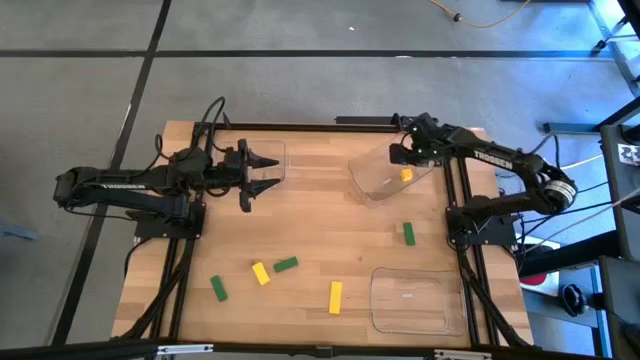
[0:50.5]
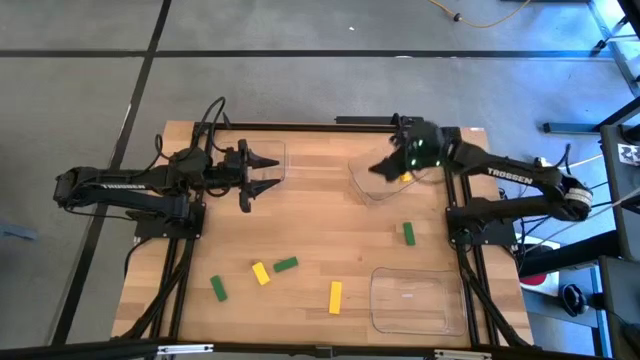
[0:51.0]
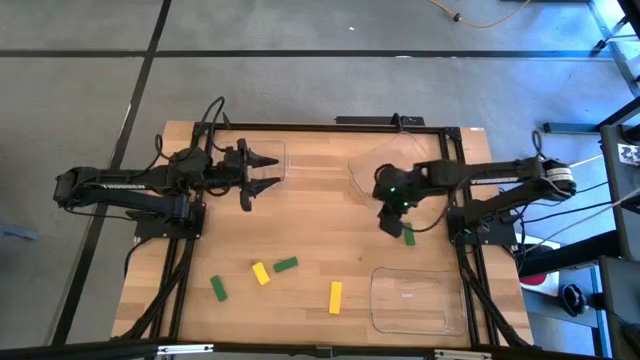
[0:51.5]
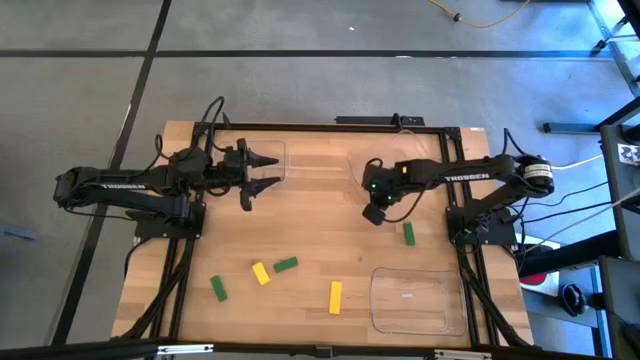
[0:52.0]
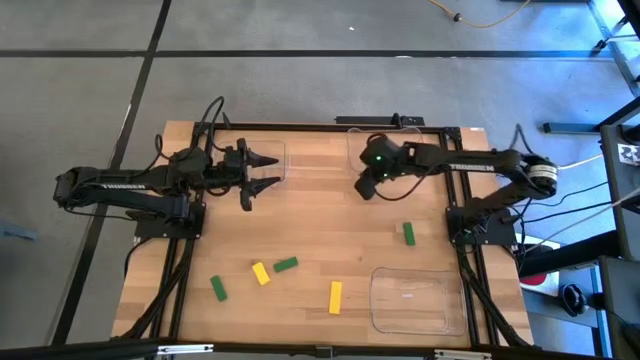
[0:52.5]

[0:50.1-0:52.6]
Task: Sort & place blocks by color
Adjust the top right transparent bin

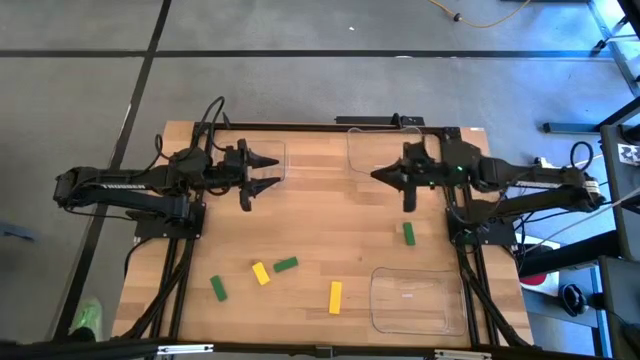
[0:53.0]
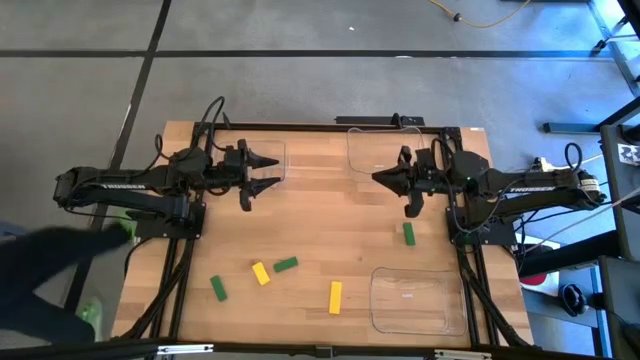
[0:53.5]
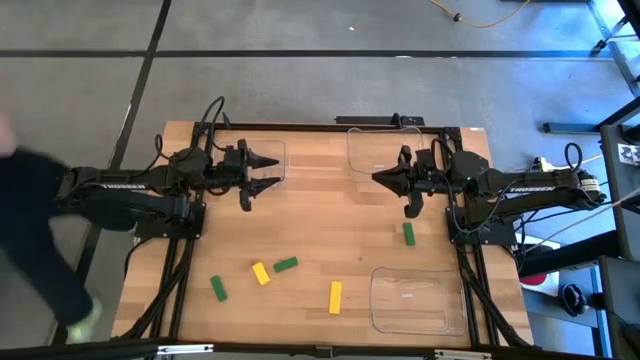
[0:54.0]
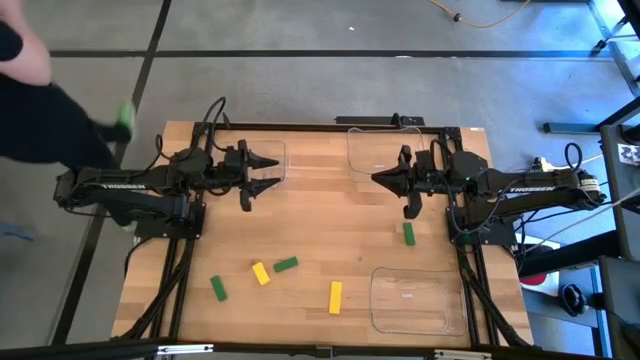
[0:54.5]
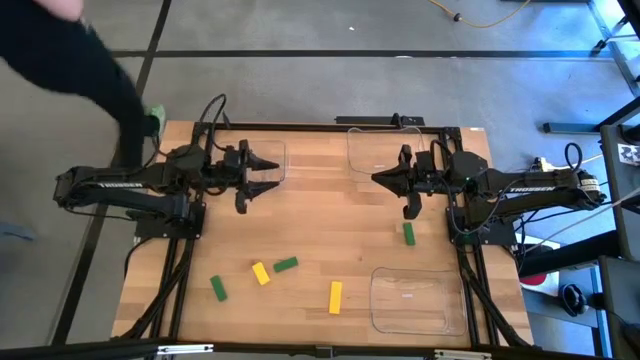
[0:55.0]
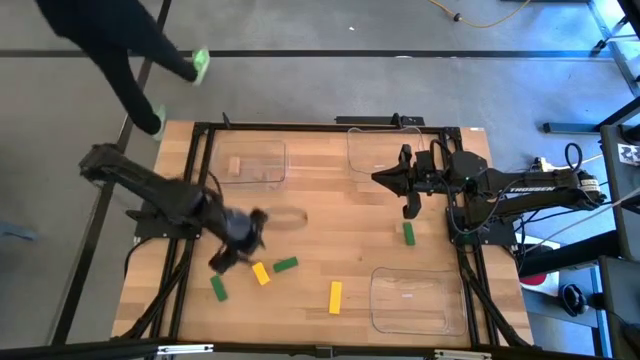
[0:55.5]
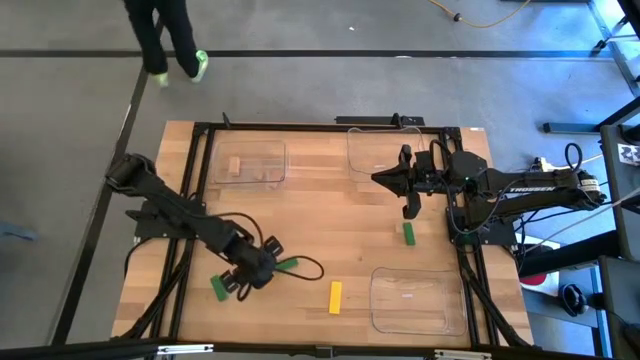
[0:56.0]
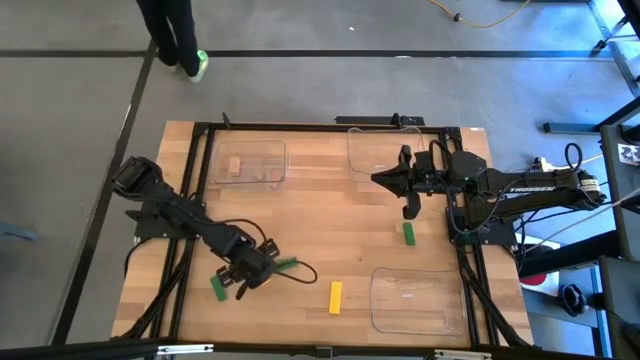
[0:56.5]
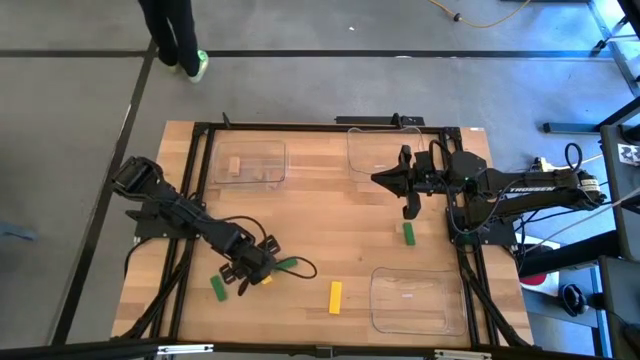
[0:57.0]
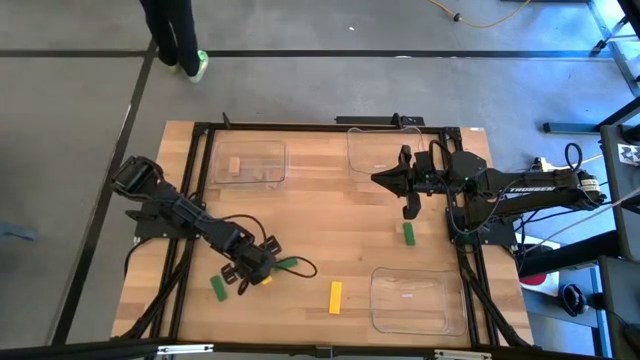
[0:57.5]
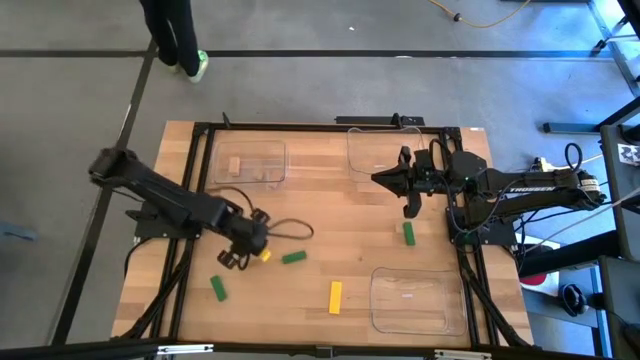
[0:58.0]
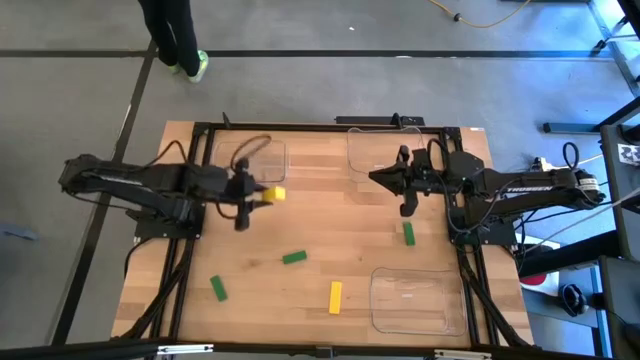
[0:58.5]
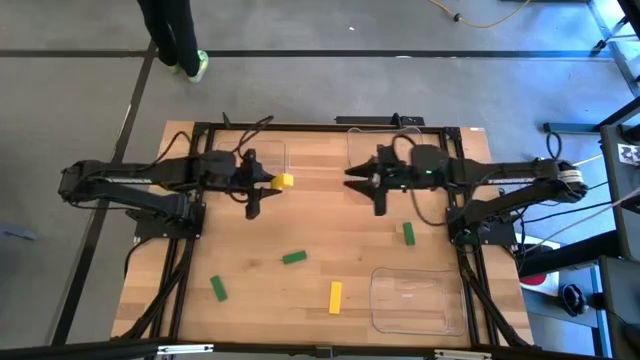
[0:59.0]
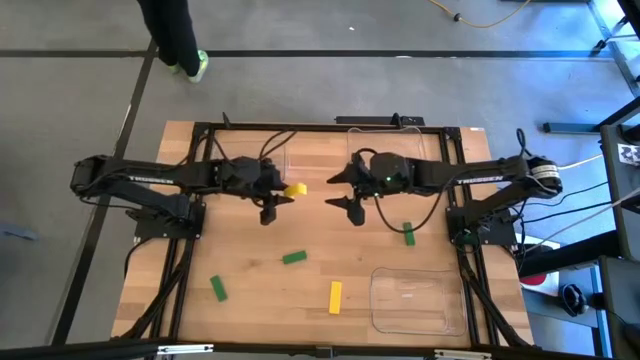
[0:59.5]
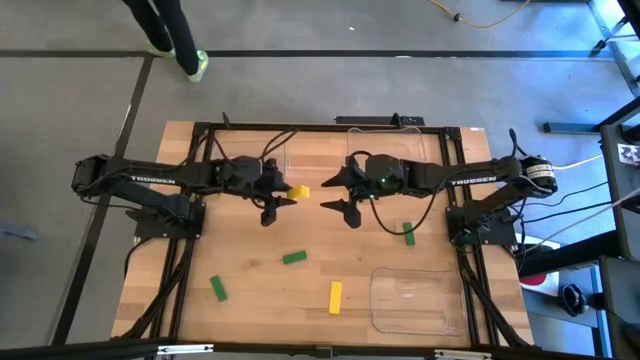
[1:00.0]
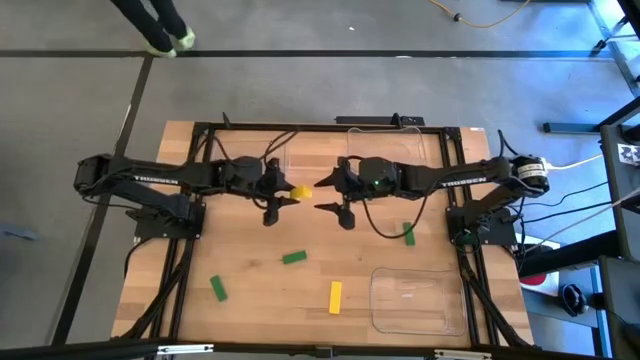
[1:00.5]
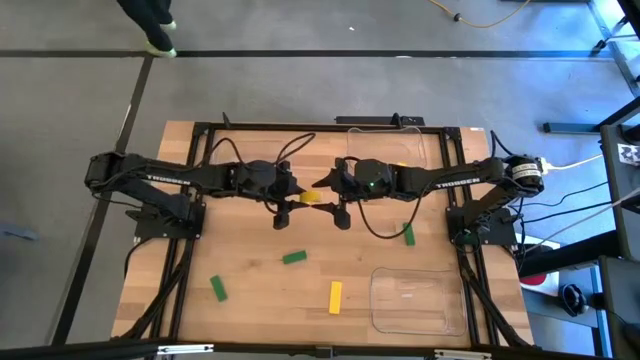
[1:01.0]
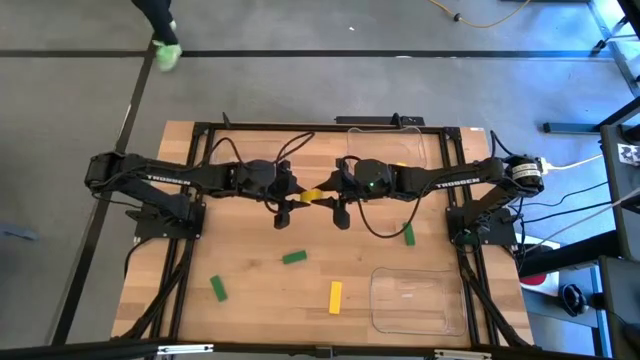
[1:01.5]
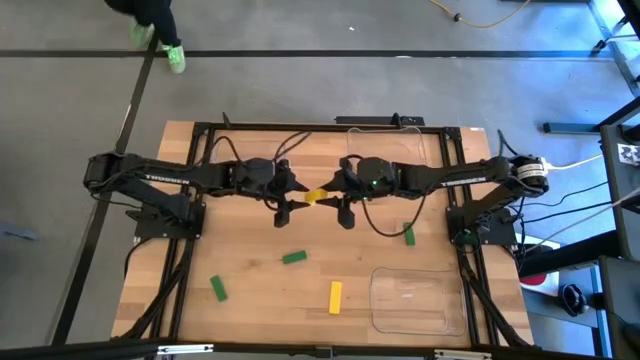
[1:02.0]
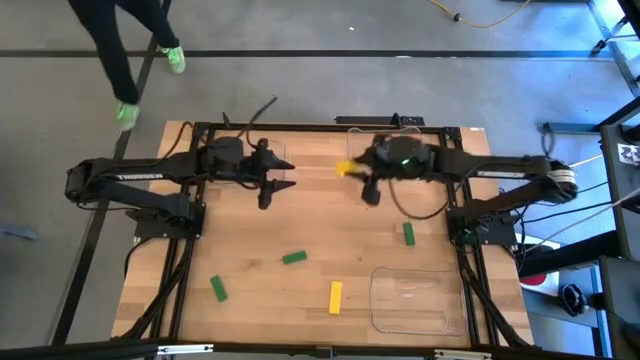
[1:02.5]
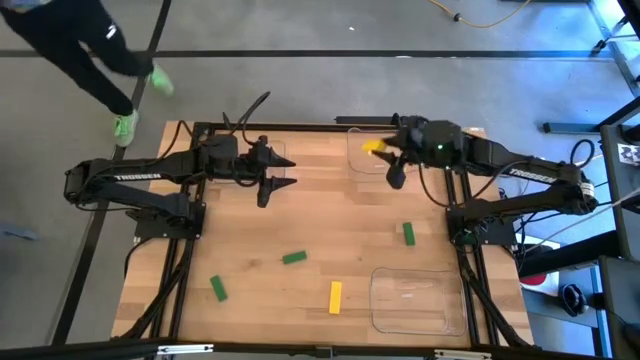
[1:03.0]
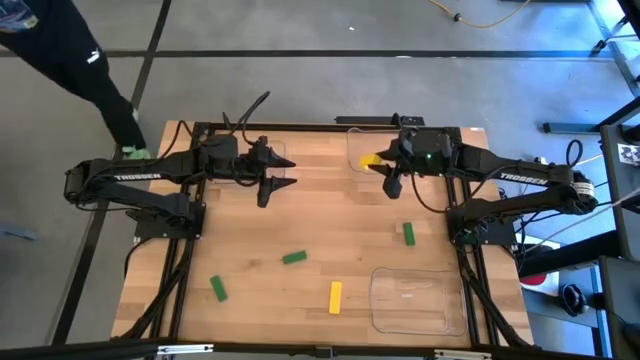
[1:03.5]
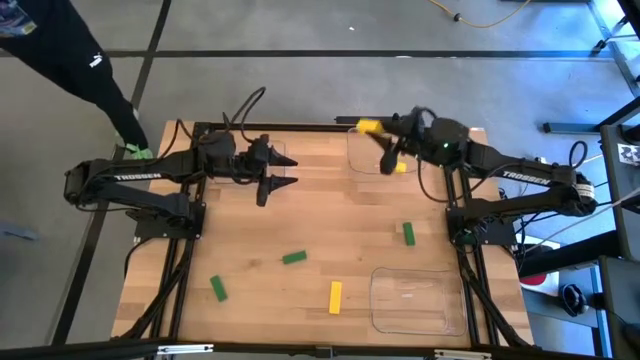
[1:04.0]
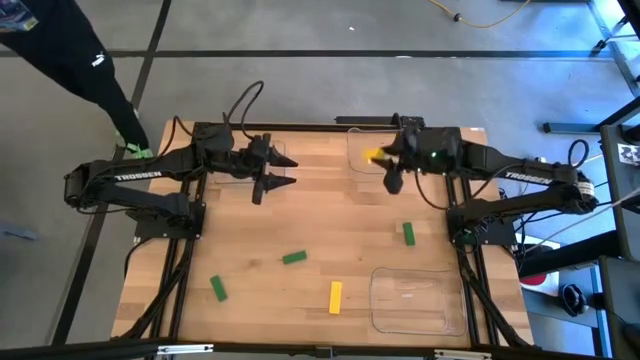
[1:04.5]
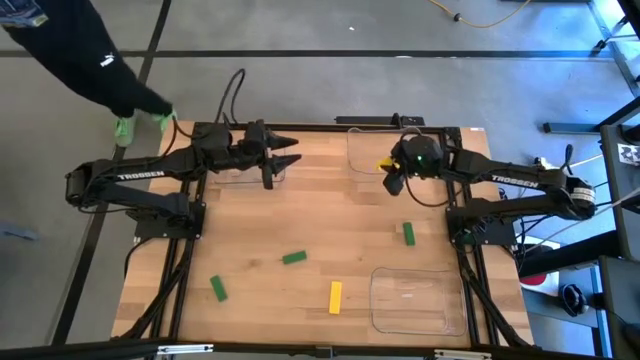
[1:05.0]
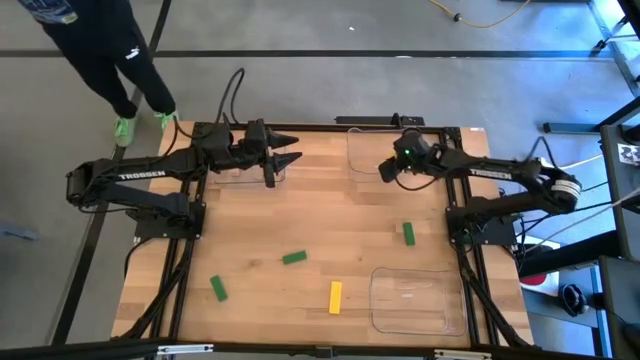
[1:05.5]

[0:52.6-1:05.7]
Put the left yellow block into the top right transparent bin

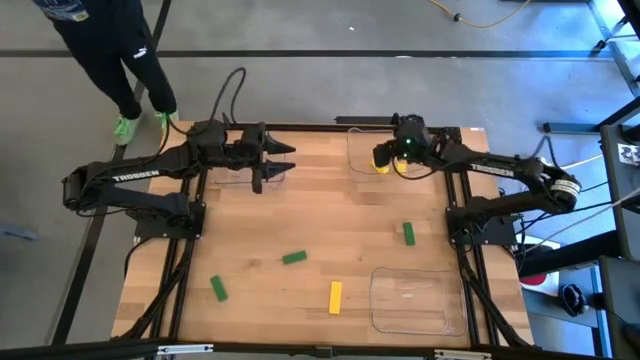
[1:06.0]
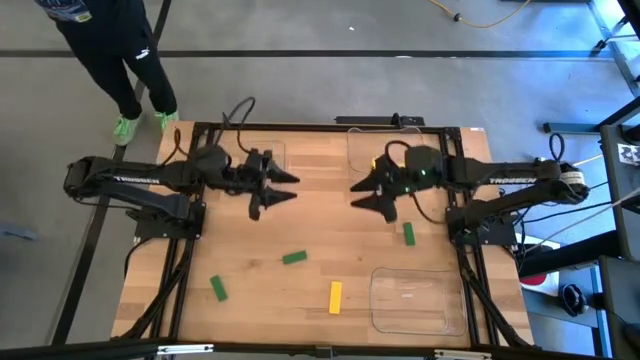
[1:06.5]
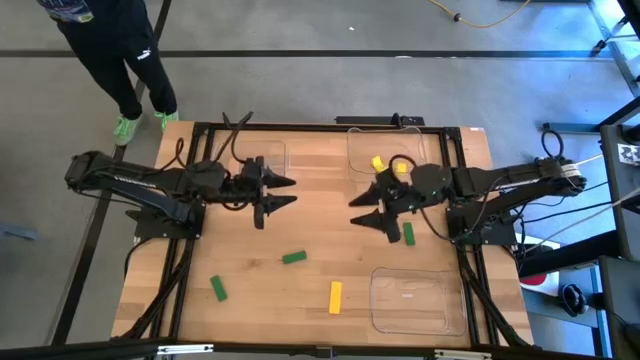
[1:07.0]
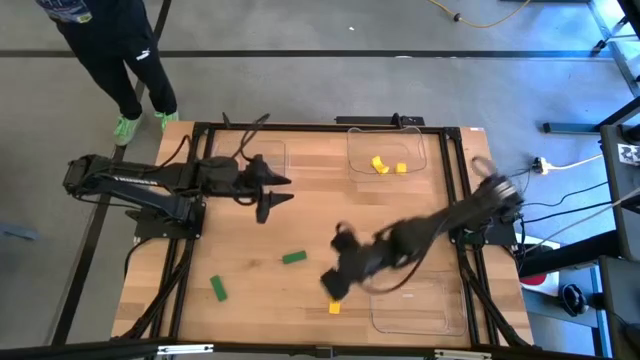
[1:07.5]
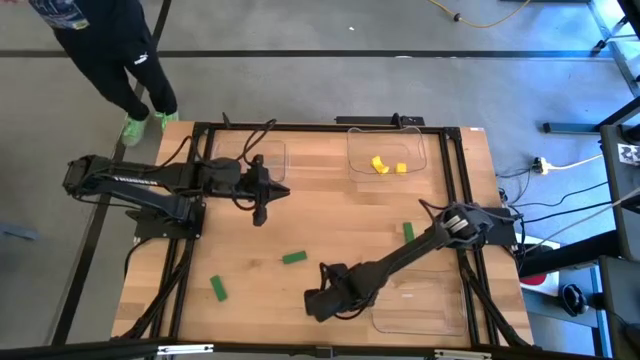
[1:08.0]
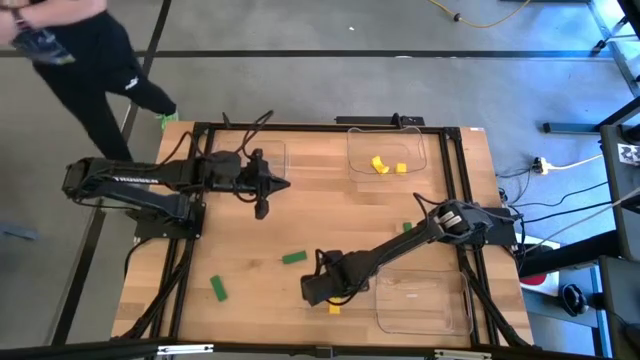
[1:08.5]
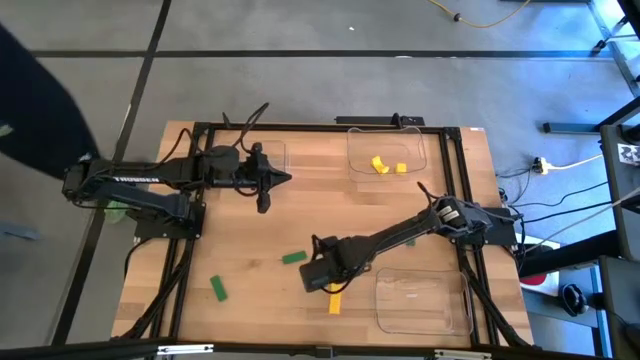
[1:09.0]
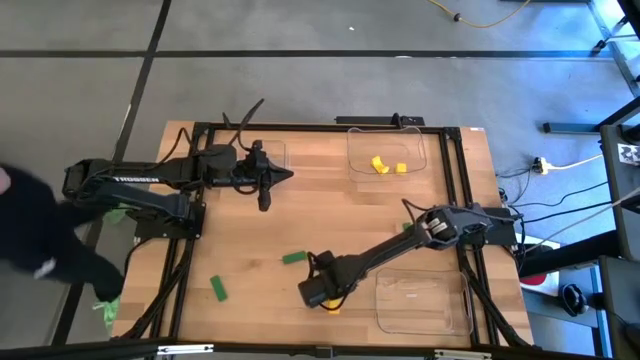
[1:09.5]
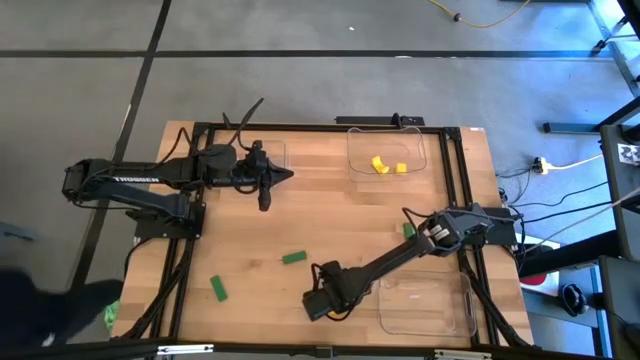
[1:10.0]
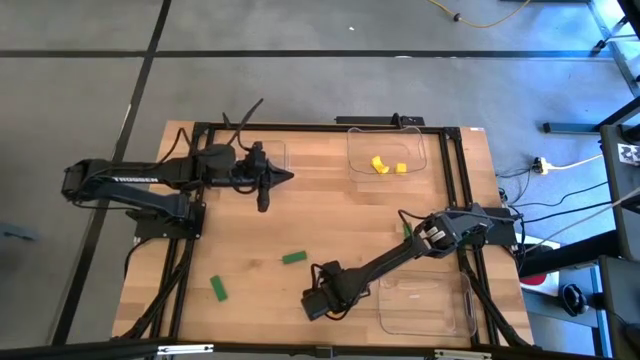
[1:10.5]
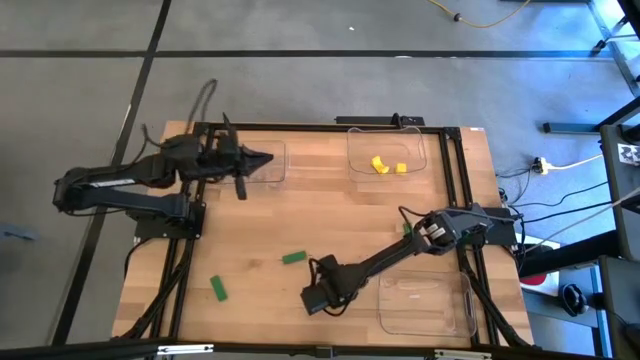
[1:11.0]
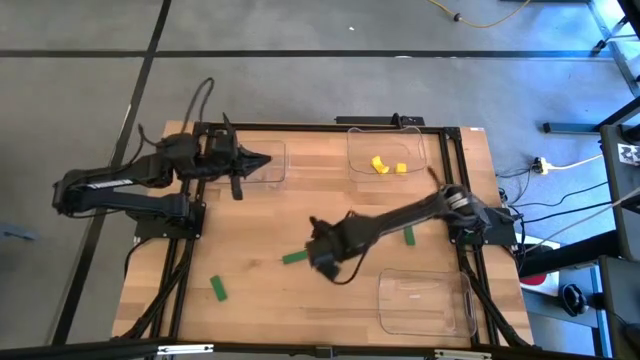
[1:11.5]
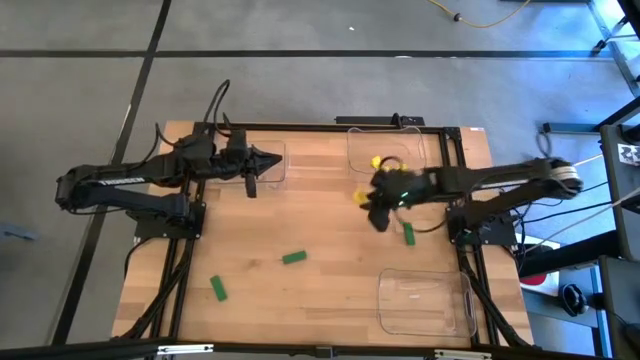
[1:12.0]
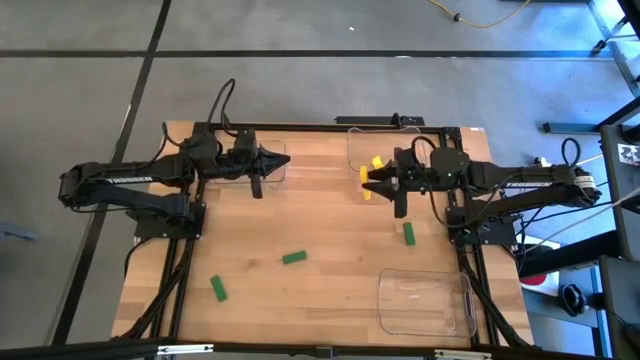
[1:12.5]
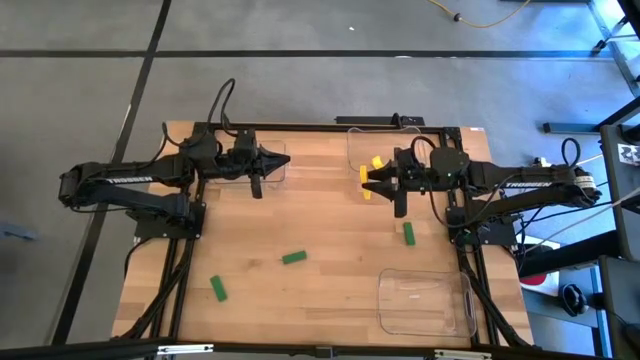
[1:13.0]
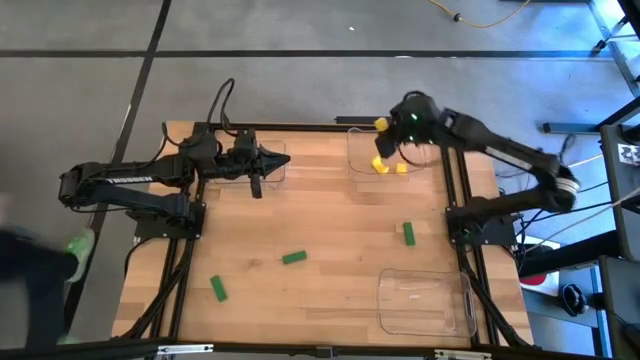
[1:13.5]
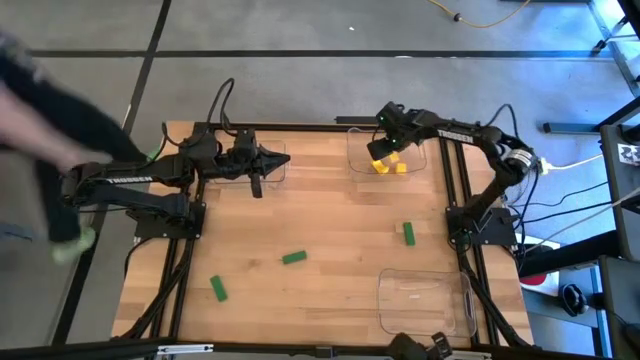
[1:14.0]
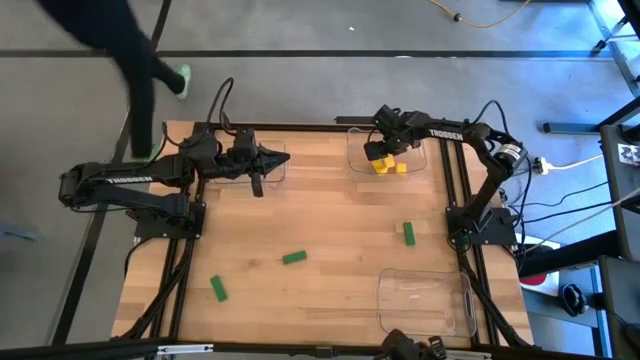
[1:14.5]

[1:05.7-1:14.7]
Put the yellow block into the top right transparent bin
